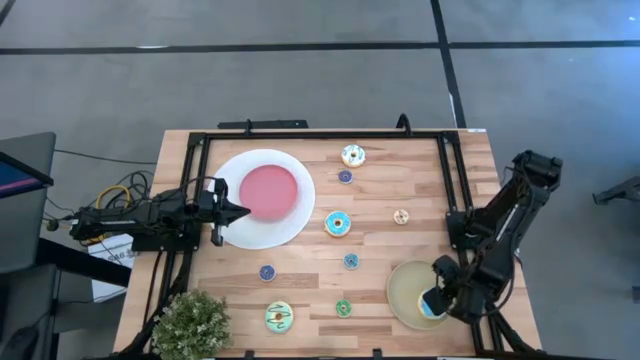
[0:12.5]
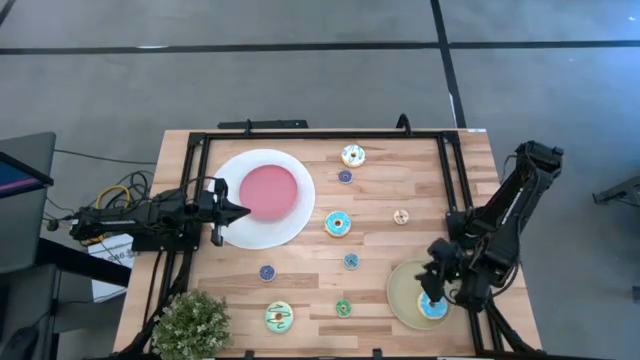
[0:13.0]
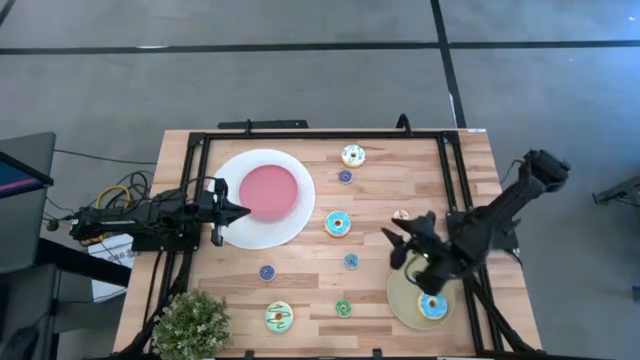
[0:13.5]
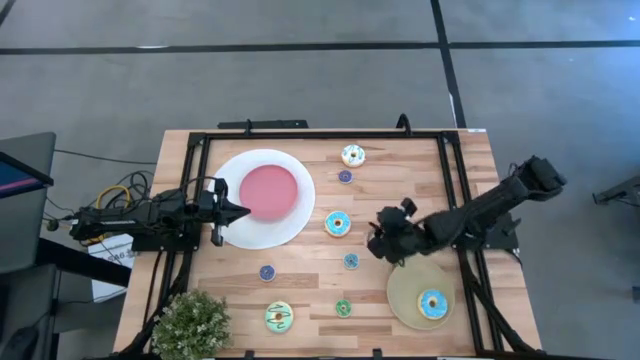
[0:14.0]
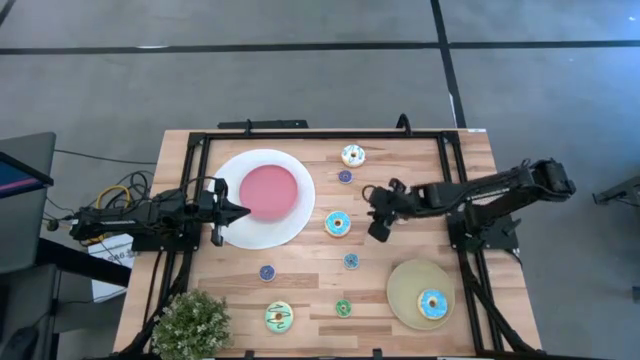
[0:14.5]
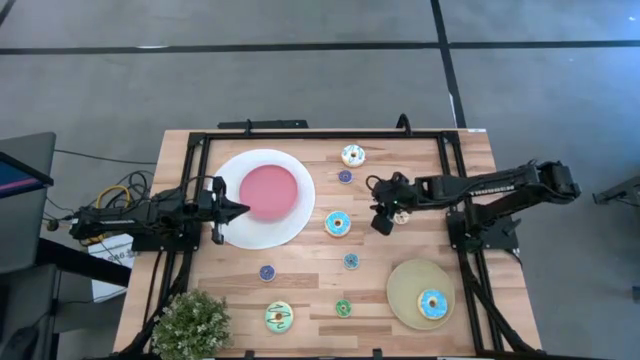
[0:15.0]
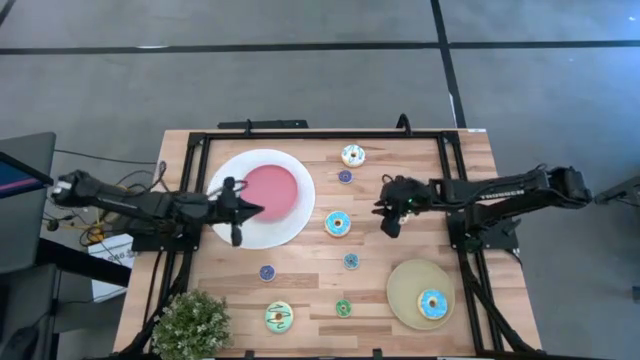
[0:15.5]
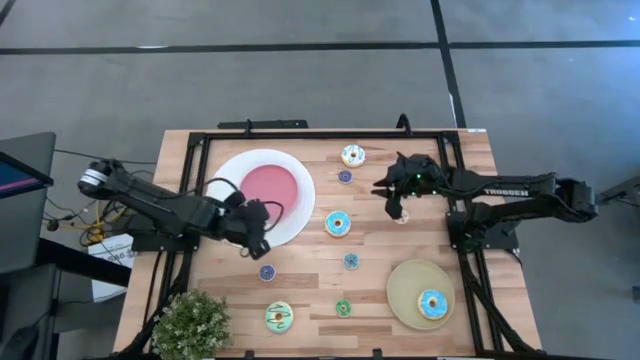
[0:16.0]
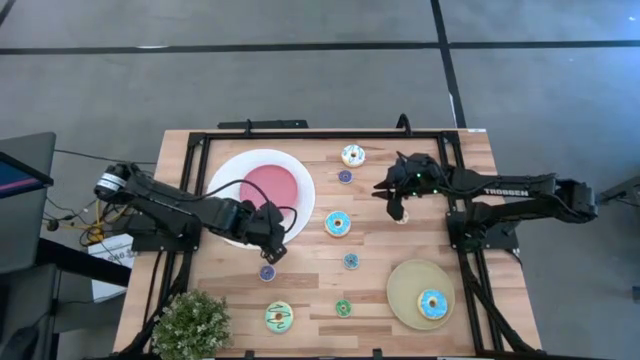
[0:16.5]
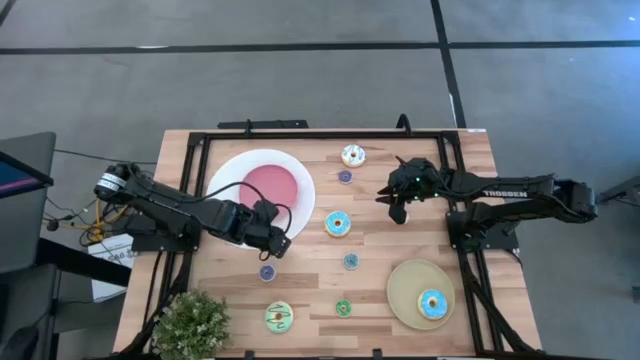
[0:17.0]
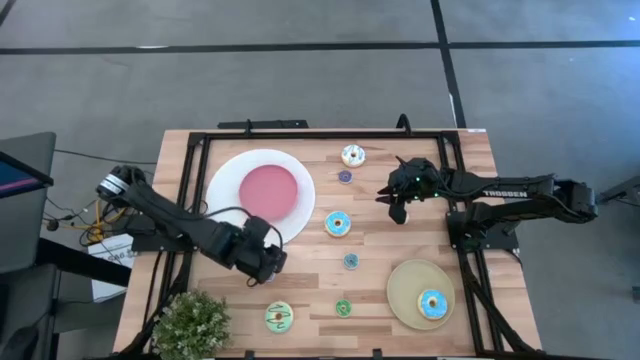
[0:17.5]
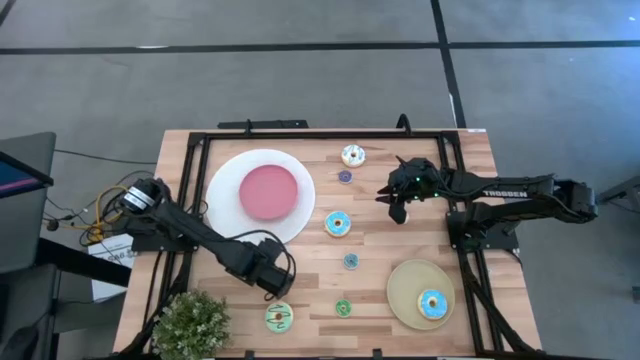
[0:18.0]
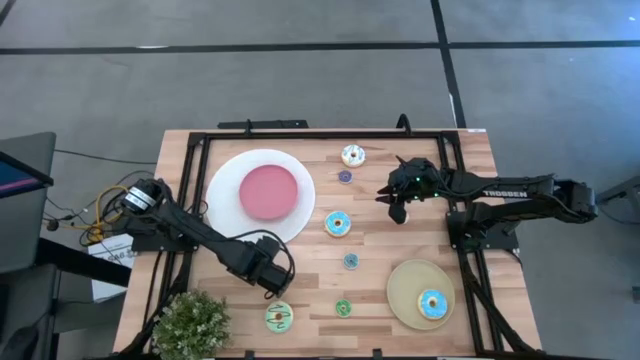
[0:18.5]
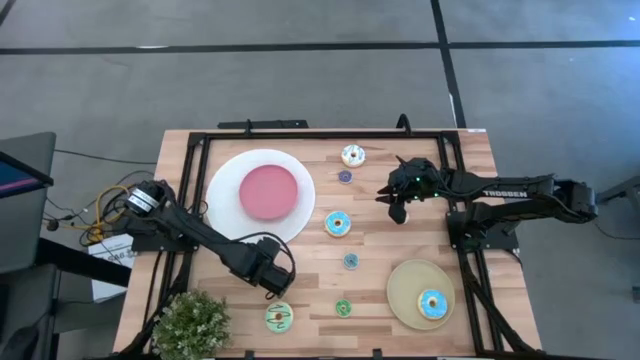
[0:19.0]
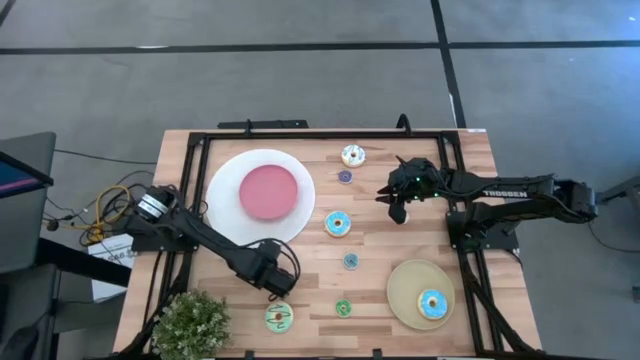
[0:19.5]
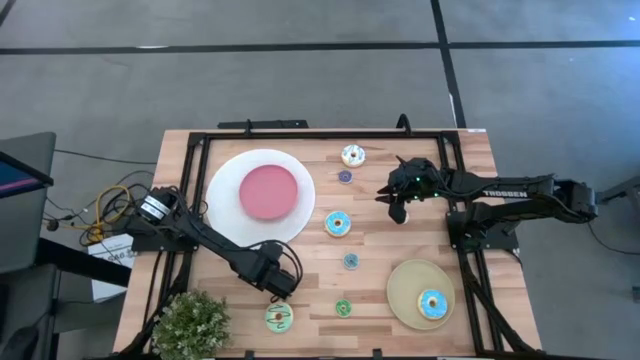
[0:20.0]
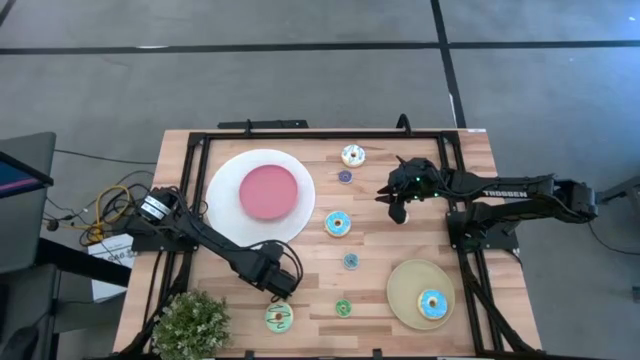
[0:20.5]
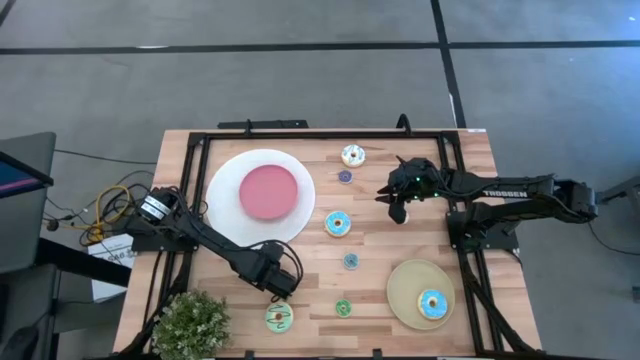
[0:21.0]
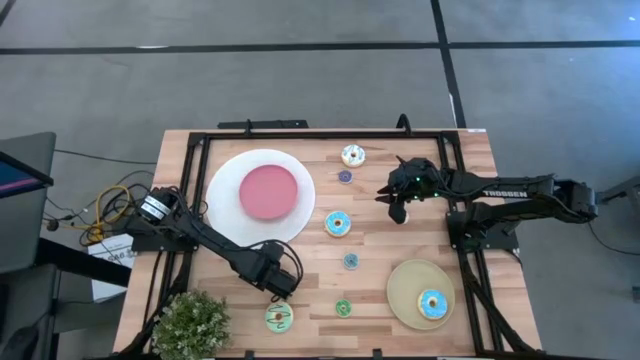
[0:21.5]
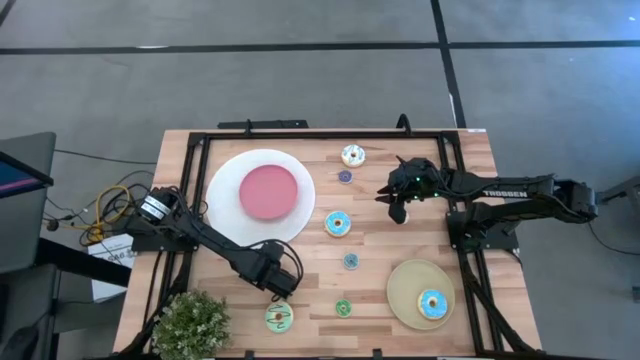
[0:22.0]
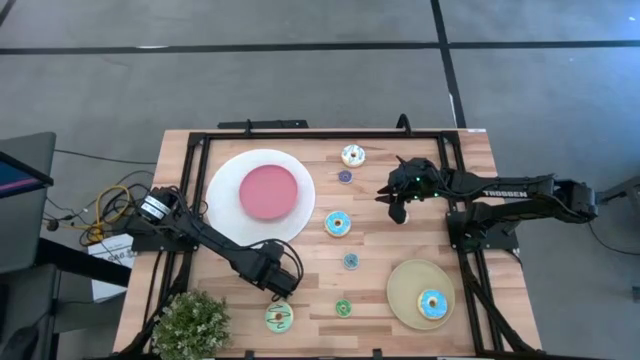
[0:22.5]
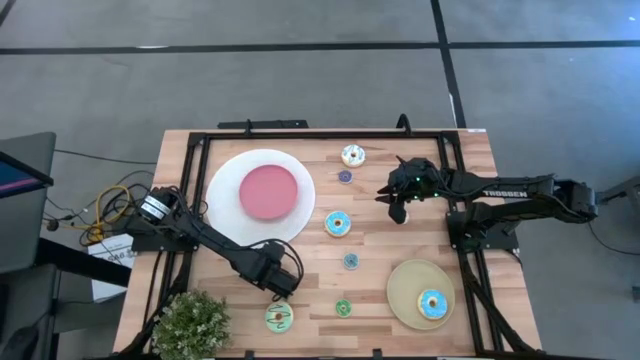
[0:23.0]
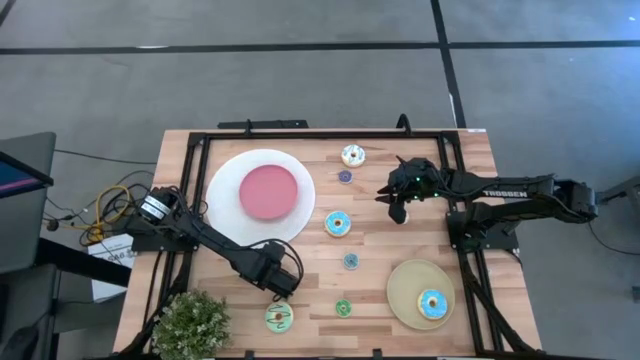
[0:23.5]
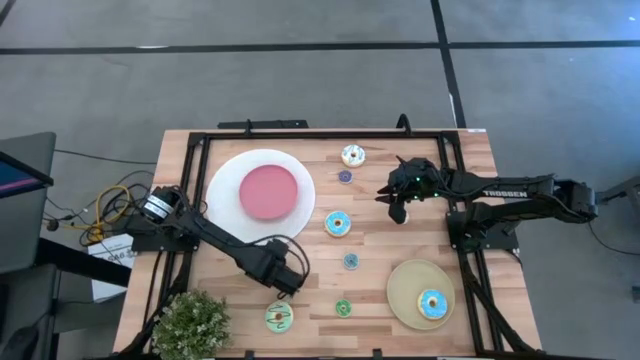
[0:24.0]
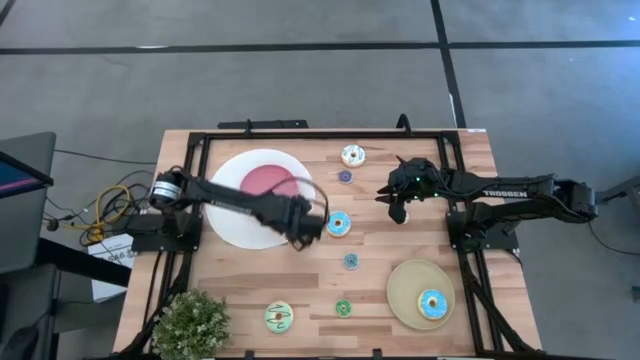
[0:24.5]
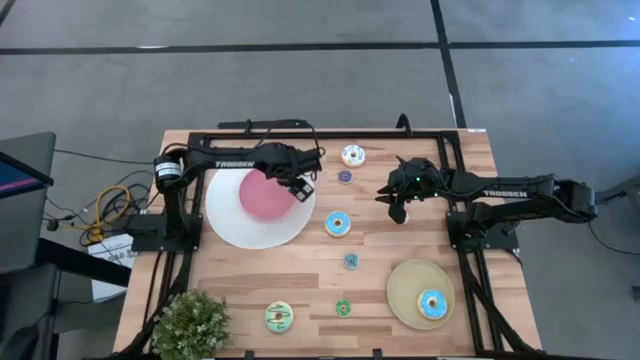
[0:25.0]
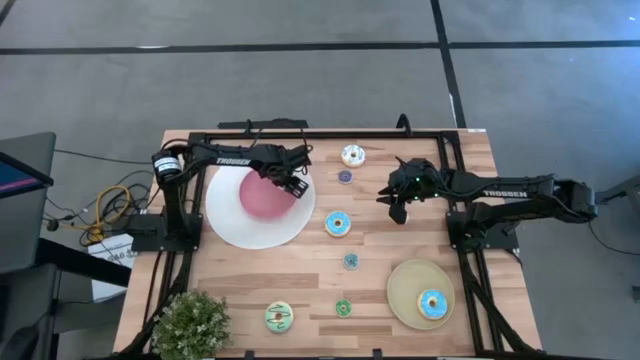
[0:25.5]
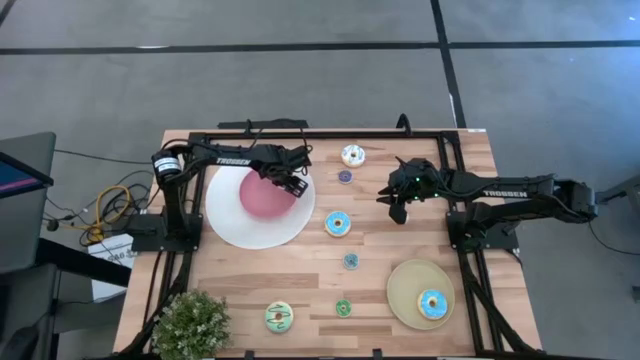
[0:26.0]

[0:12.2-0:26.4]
Task: Pick & Place donuts
Put the small blue donut onto the pink plate

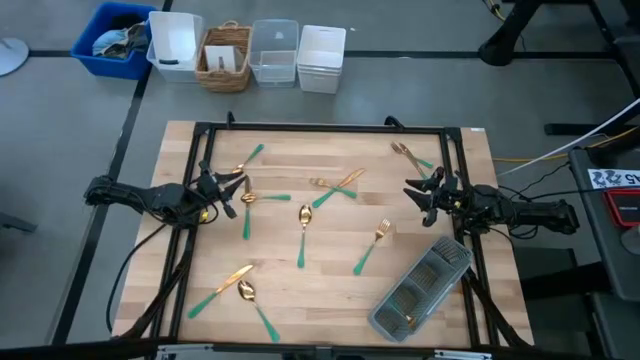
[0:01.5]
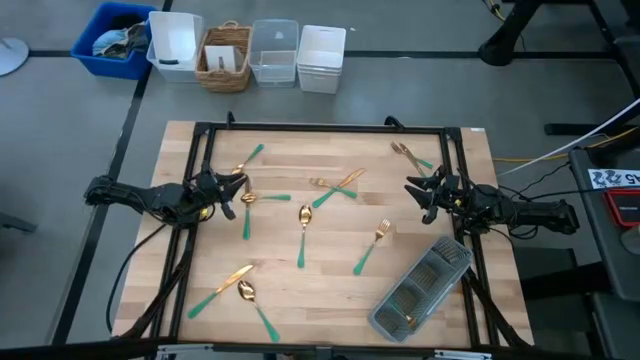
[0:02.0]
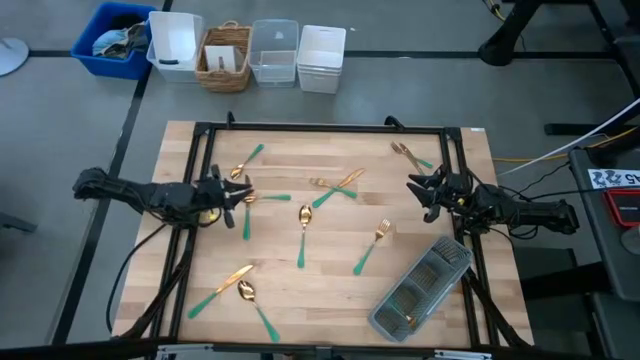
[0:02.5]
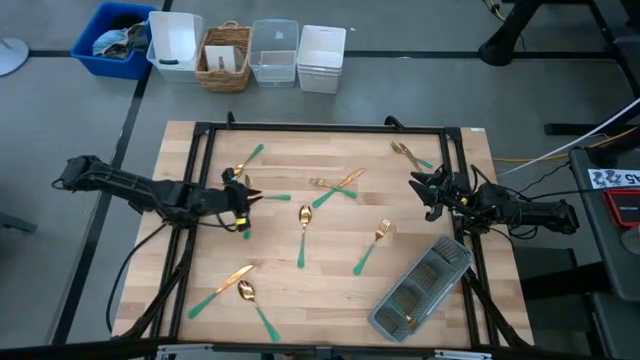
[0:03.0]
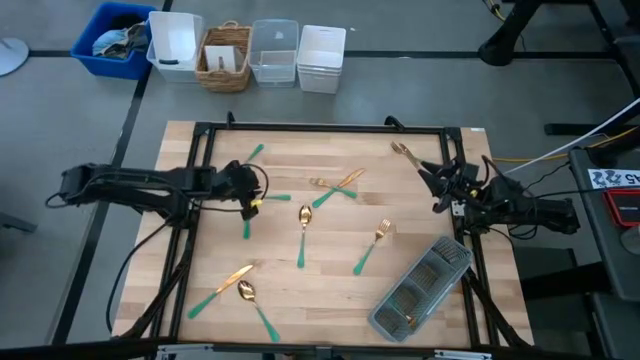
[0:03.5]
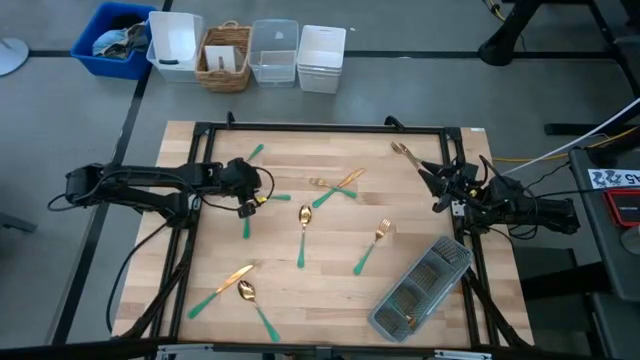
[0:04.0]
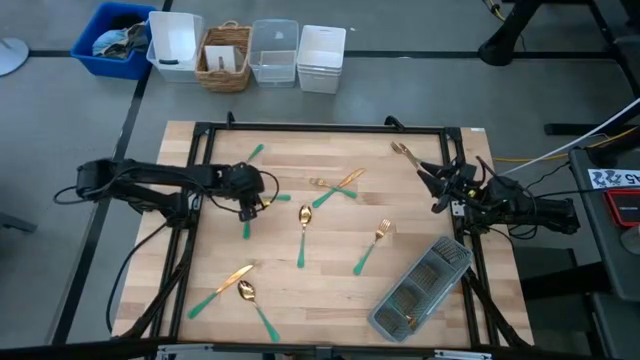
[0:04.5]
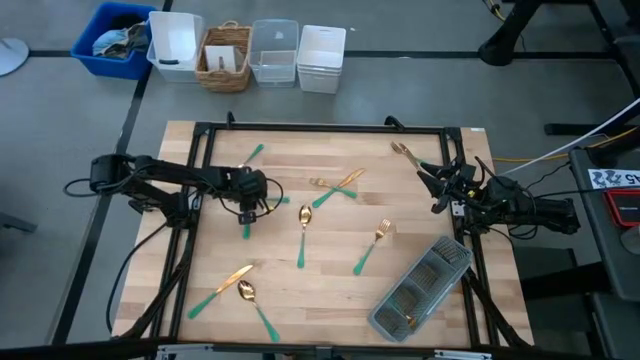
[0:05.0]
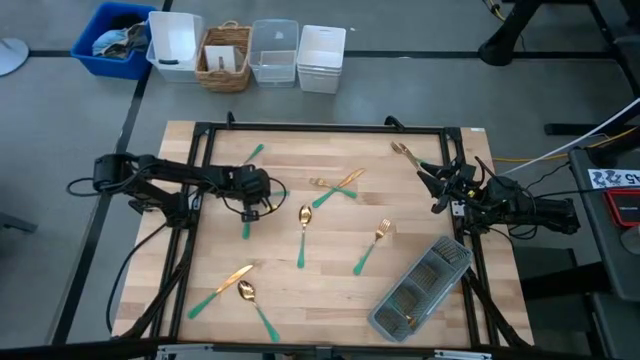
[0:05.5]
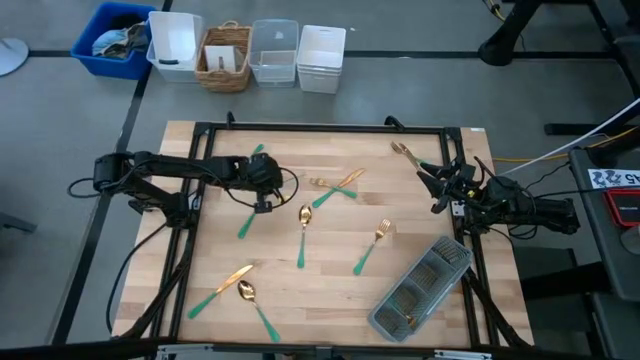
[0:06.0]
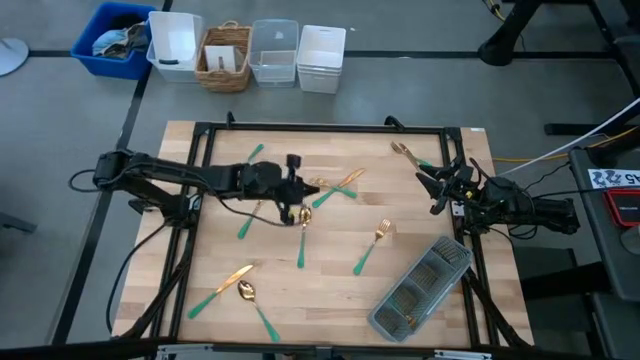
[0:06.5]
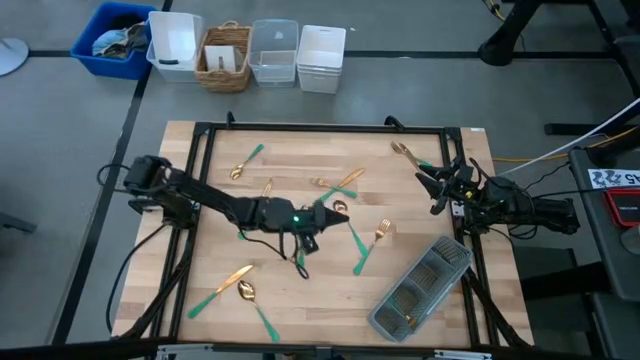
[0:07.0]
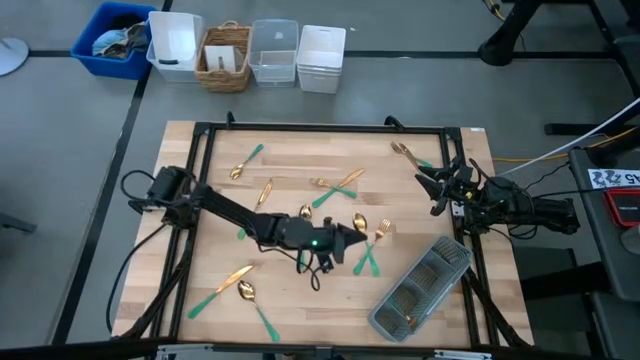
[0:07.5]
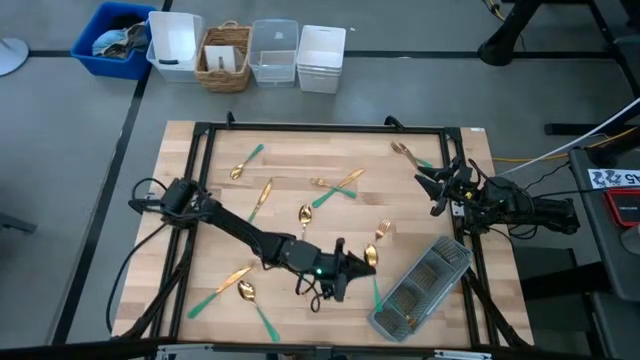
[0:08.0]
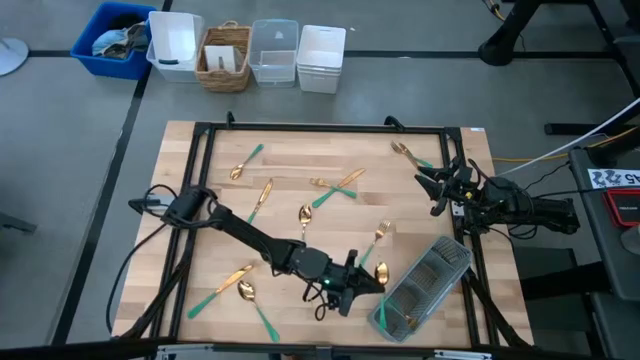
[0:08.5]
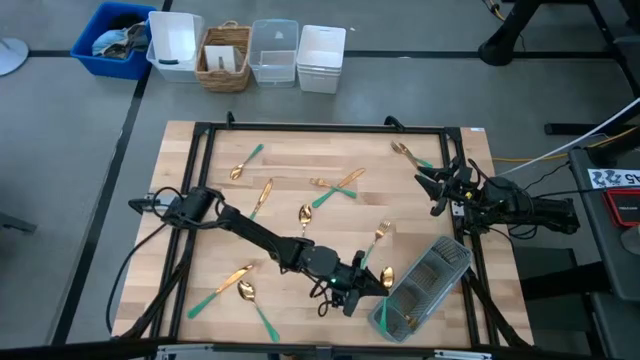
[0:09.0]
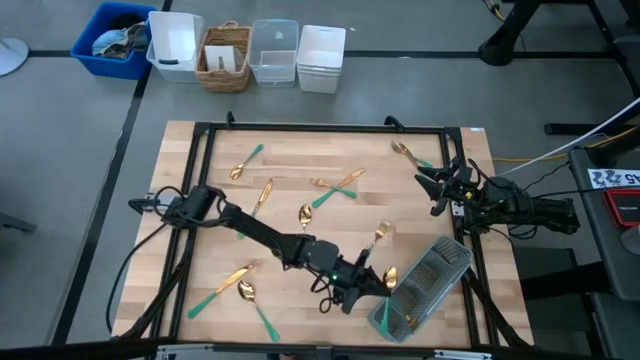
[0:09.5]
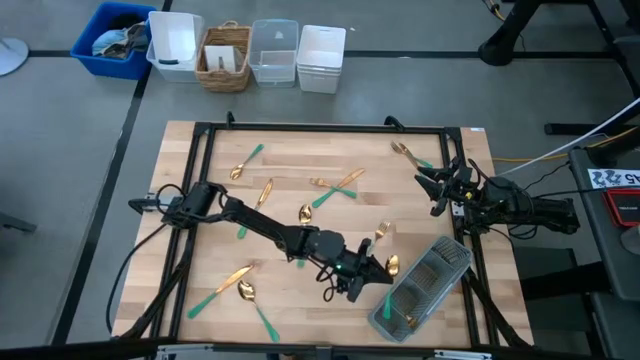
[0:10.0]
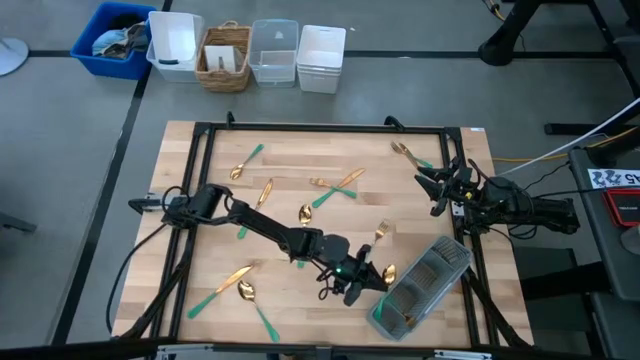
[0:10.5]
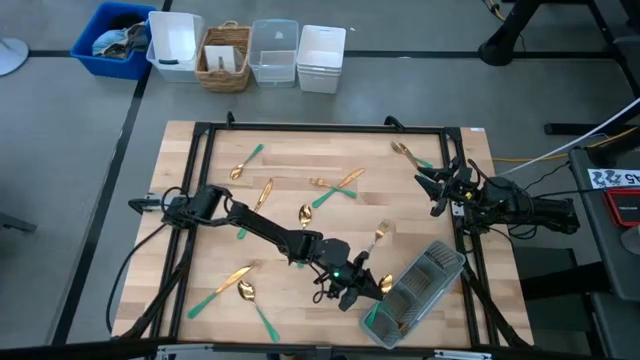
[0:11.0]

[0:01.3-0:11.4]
Task: Sort silverware
Put the middle left spoon into the utensil organizer
